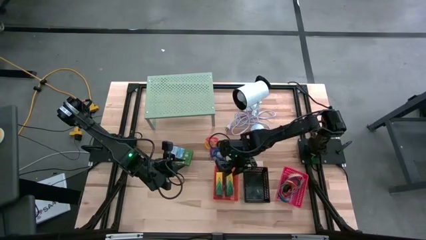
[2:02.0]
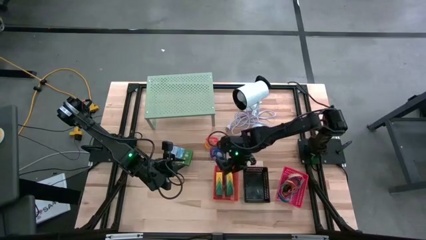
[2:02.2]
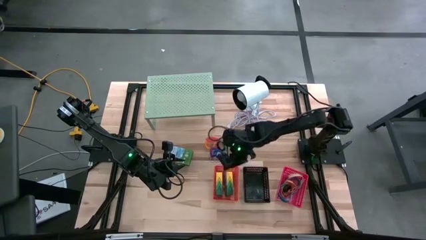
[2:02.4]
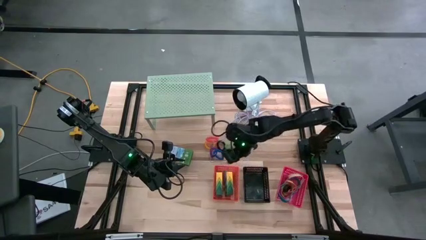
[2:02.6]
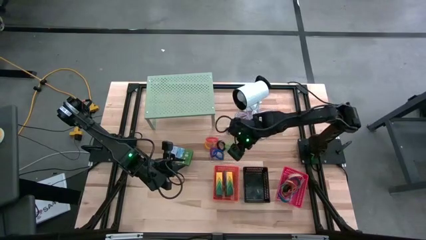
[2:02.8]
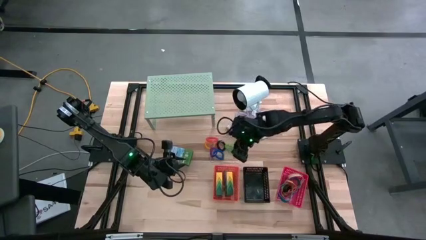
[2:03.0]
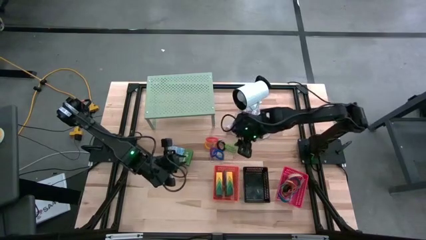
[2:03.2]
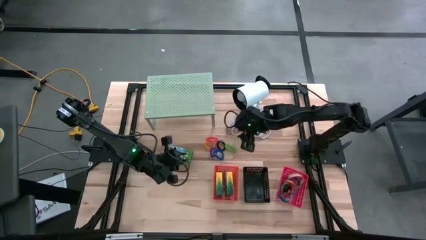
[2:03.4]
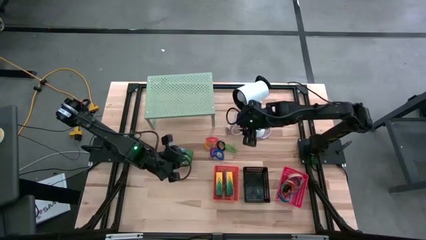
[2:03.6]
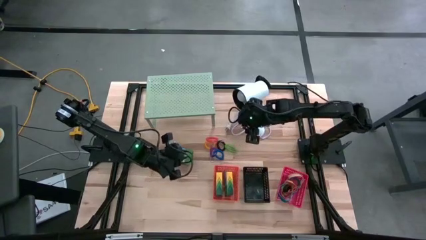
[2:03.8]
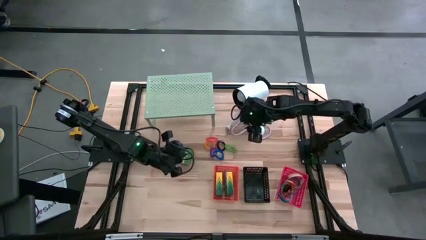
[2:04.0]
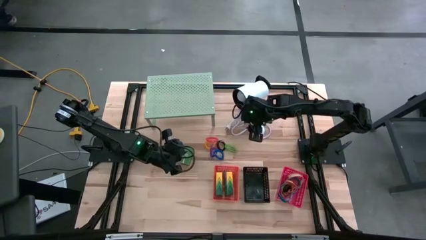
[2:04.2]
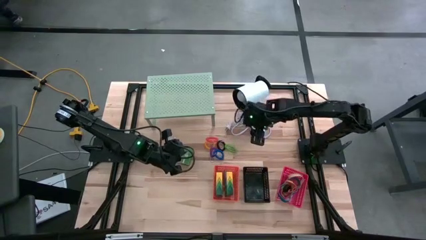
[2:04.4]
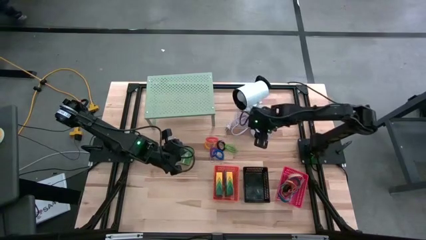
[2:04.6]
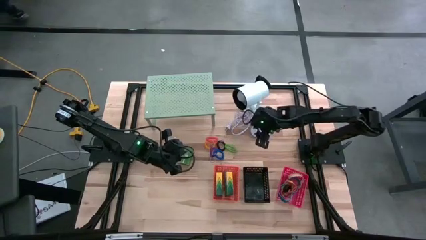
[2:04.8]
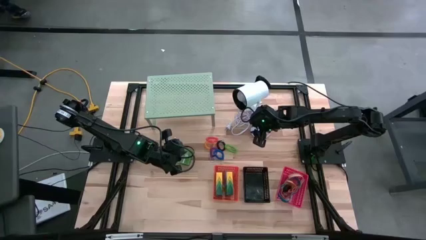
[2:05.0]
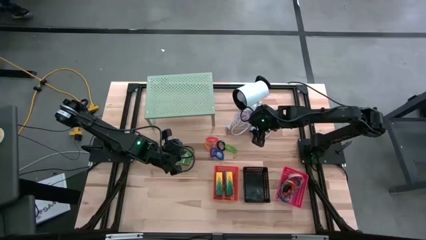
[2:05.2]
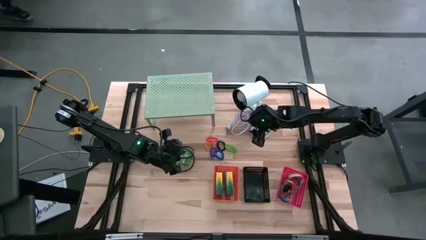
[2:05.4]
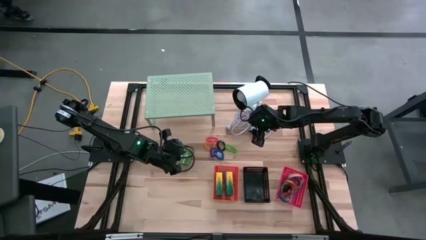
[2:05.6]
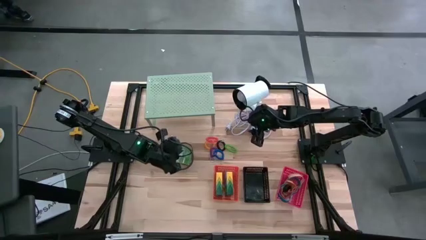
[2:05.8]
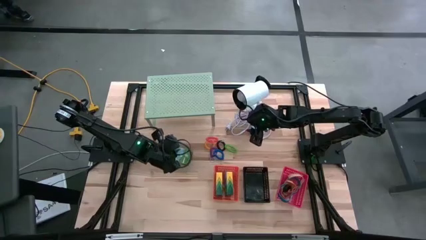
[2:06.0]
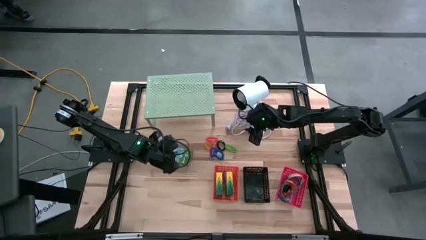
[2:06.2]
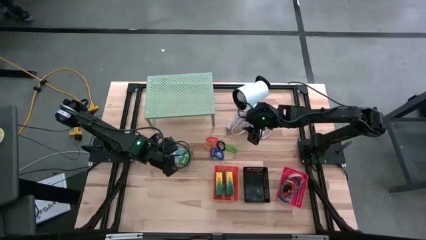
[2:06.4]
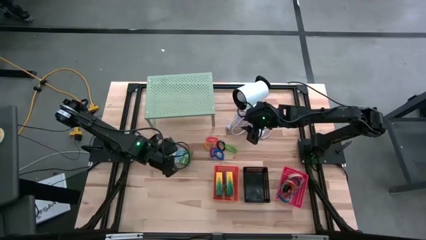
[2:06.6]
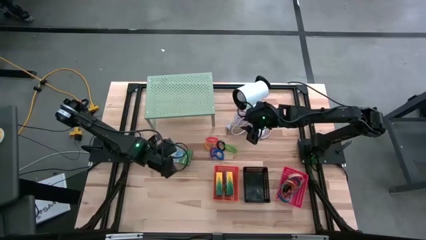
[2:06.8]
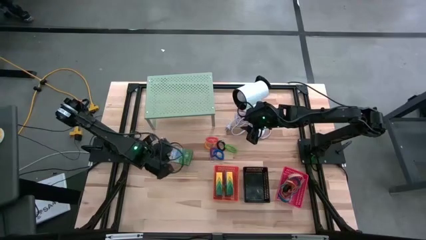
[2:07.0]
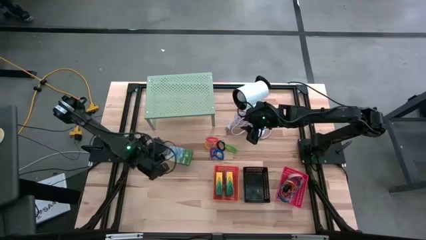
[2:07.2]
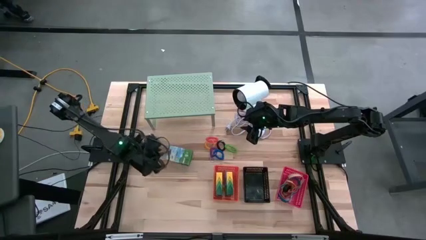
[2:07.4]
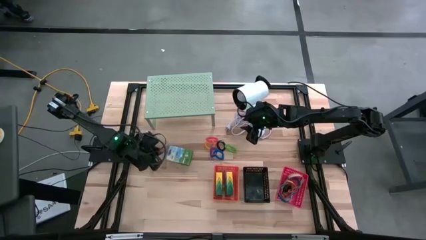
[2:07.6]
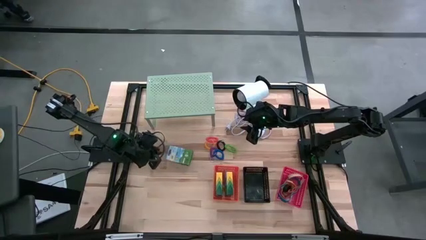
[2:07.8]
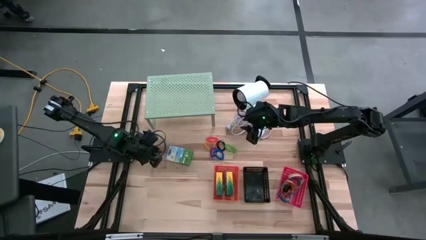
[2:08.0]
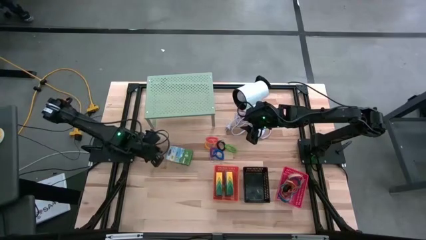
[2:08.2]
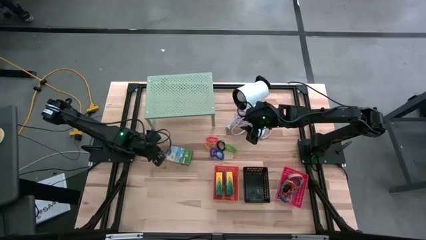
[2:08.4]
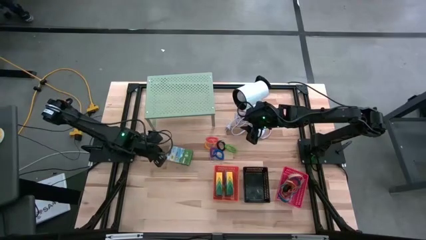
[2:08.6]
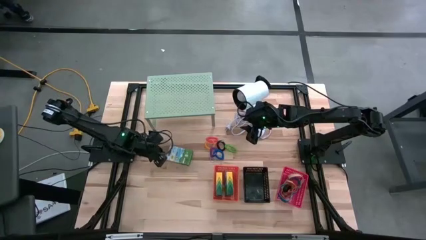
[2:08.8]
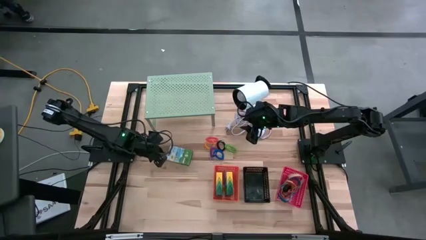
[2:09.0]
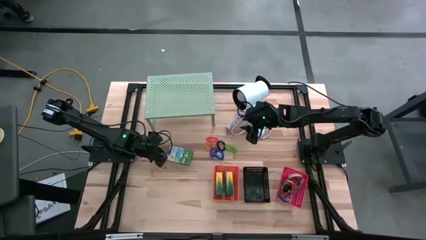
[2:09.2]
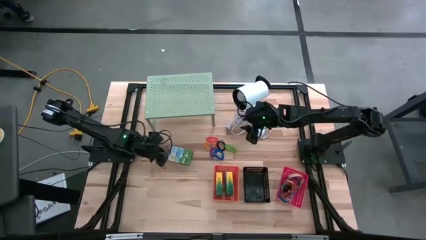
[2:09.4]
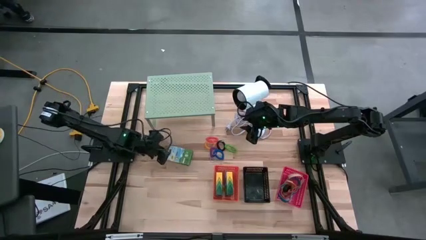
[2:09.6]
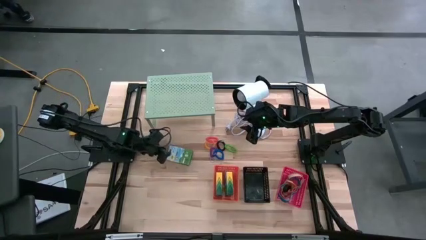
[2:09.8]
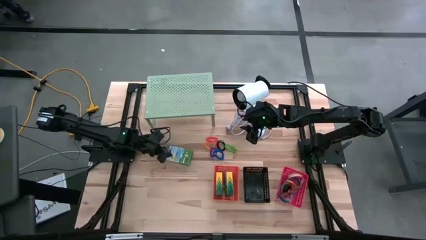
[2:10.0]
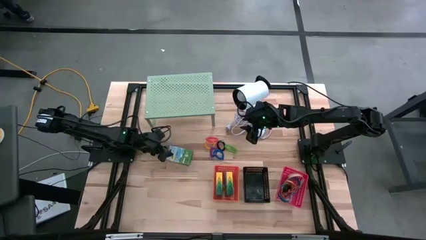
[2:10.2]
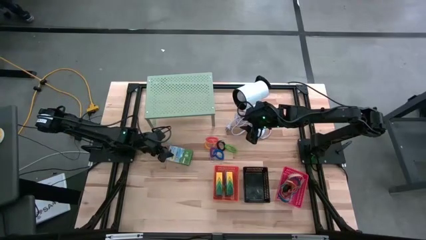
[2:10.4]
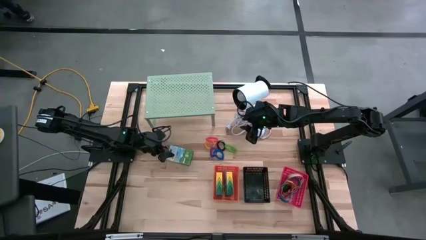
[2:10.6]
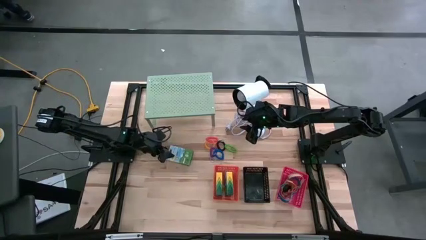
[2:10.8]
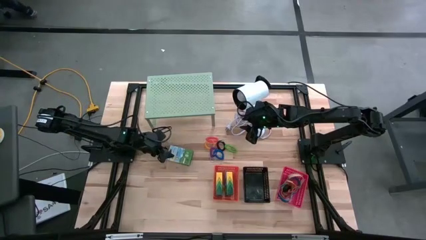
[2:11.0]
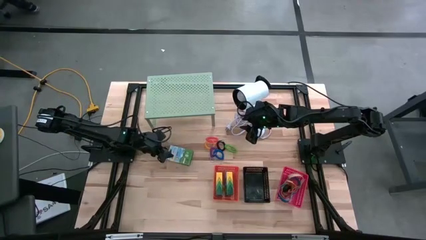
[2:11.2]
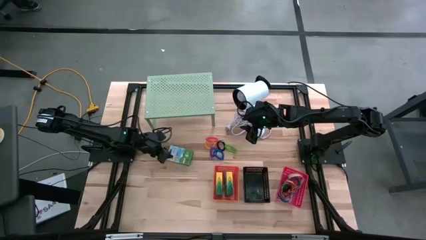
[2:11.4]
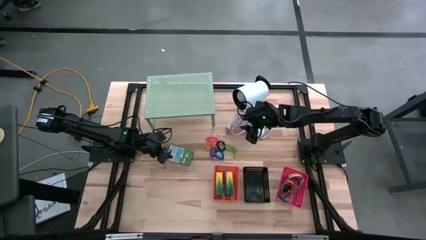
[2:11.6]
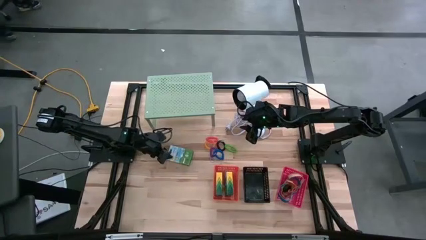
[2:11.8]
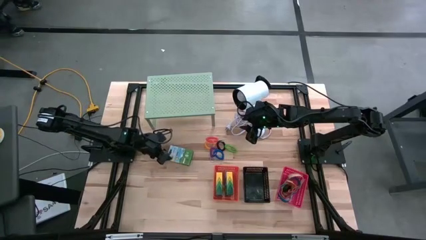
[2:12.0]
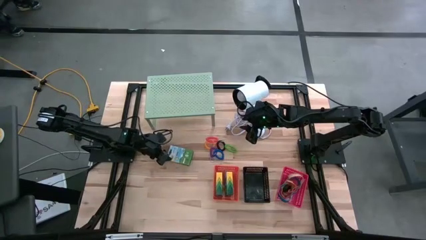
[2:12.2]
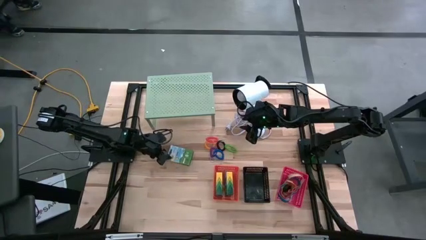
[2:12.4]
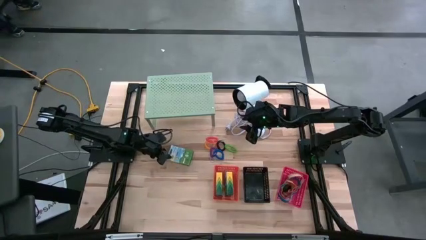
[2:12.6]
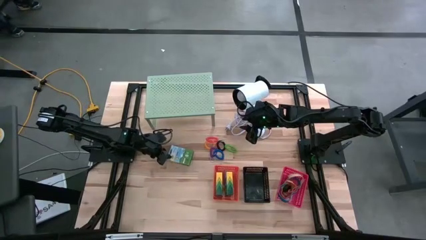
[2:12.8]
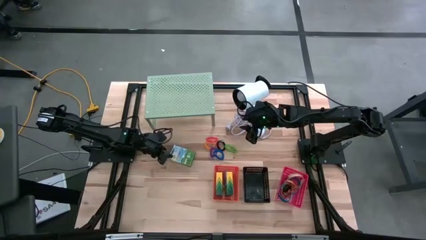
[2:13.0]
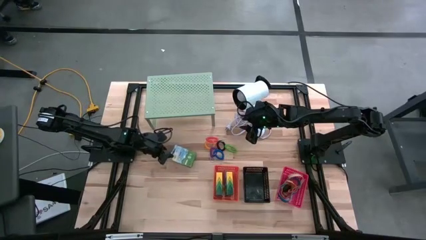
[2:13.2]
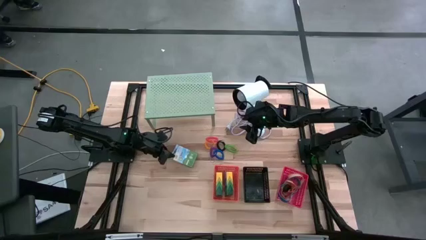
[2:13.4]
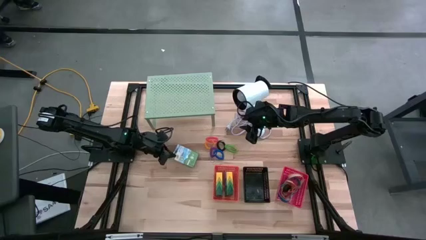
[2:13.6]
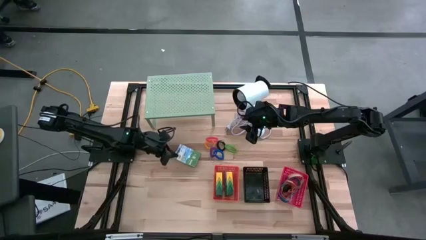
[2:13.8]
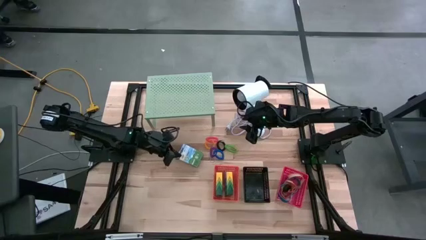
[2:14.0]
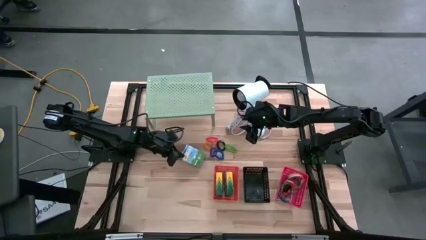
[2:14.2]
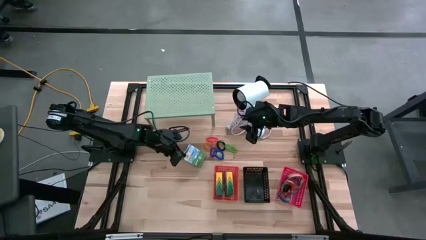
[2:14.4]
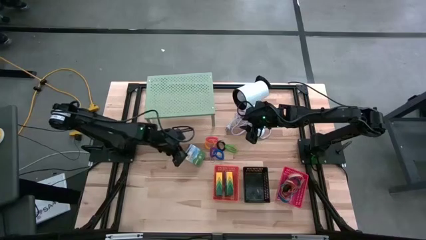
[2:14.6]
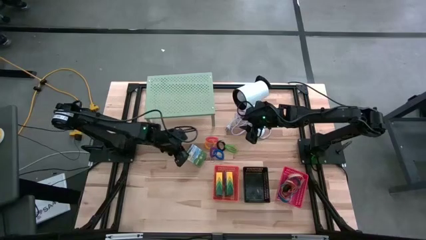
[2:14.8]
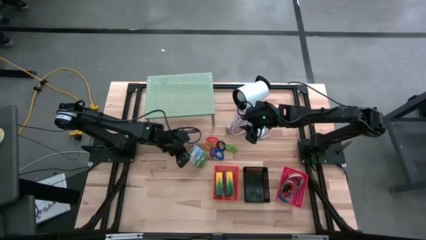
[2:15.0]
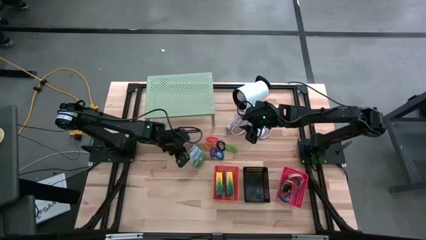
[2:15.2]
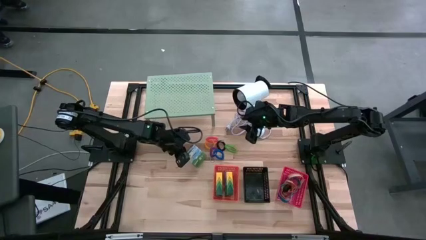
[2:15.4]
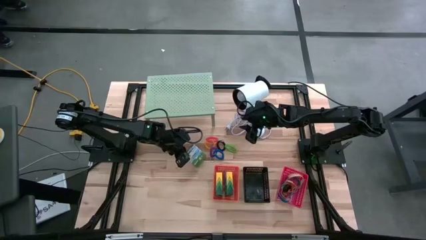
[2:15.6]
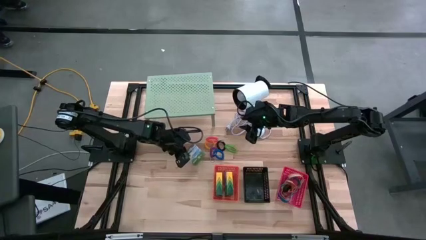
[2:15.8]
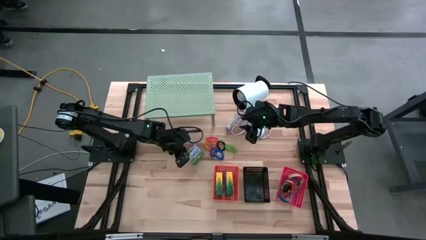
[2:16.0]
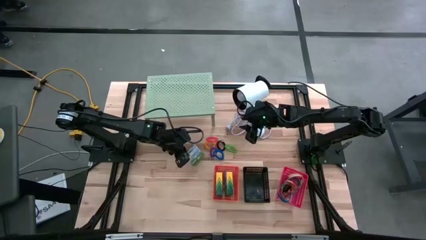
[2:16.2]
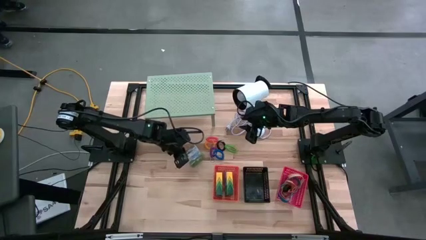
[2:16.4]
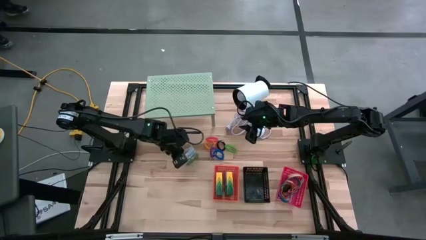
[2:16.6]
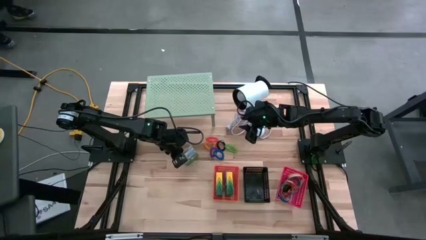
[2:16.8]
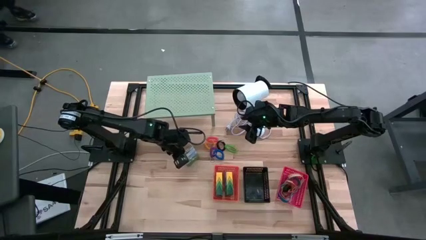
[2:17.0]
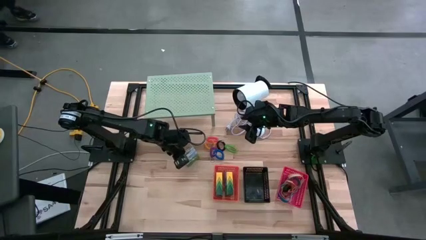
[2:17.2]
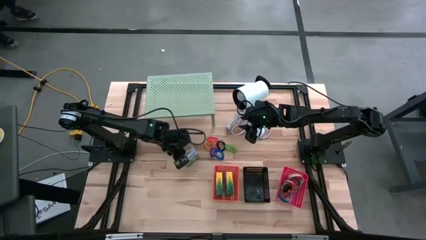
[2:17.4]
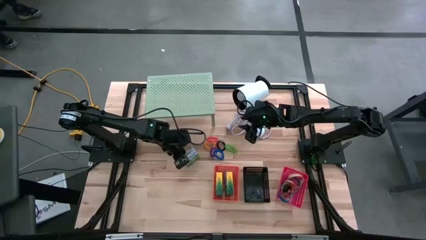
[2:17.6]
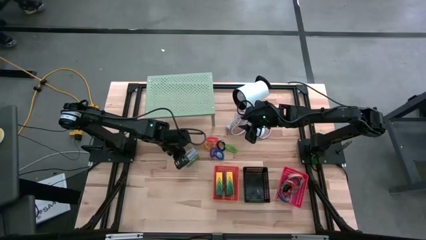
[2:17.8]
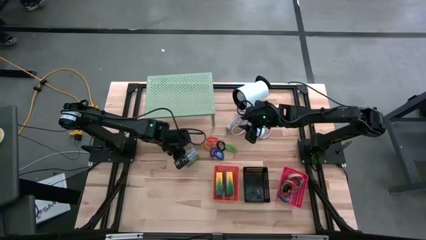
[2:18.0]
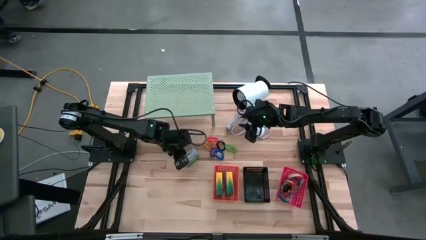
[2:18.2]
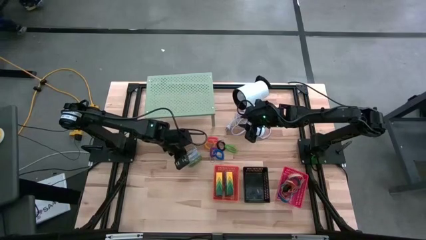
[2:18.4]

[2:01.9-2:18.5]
Task: Pick & Place Office Desk Supplies
Put the crayon box into the orange basket
